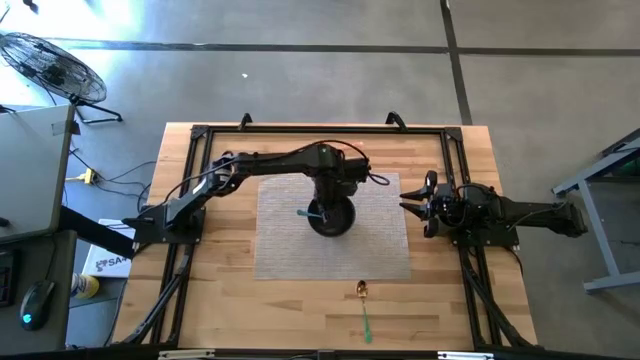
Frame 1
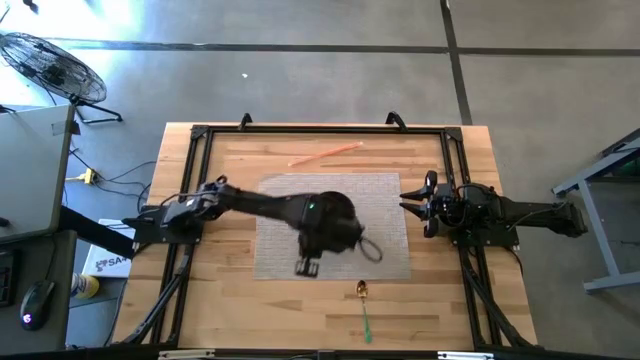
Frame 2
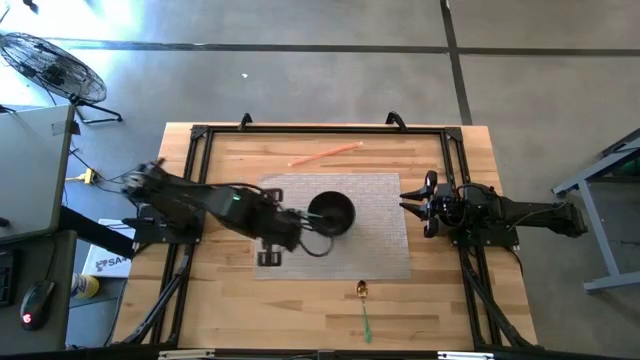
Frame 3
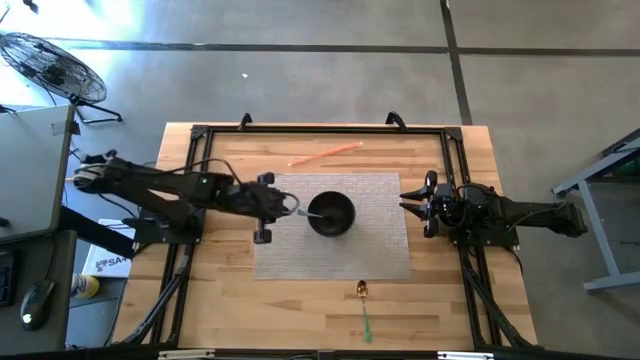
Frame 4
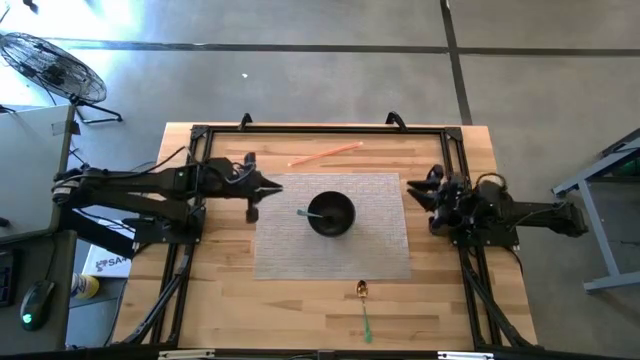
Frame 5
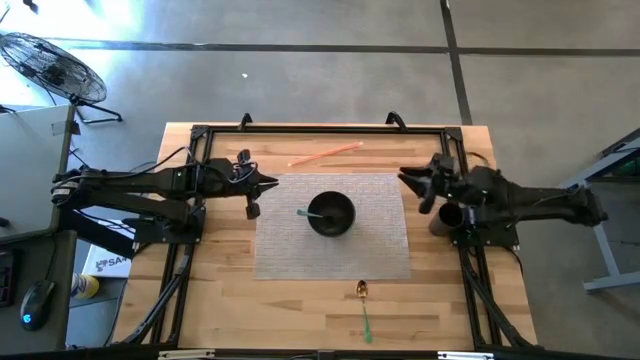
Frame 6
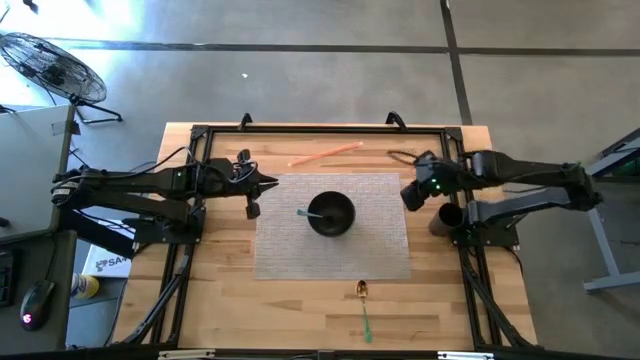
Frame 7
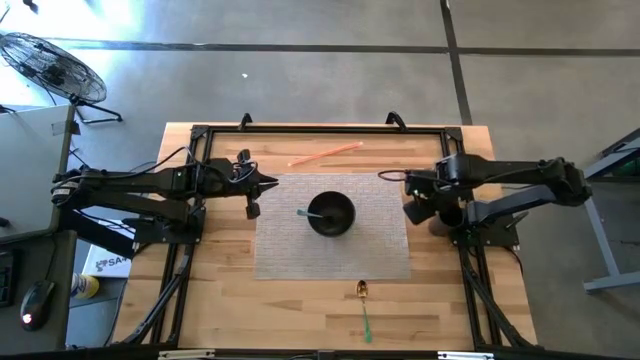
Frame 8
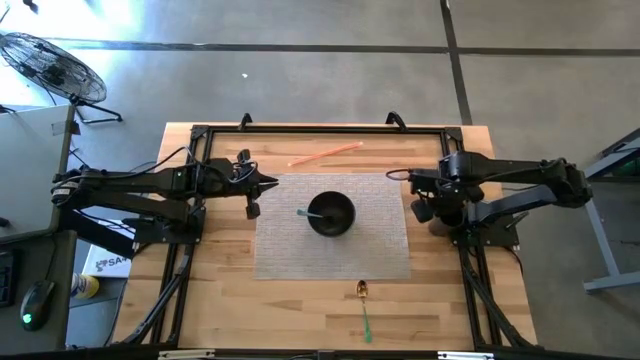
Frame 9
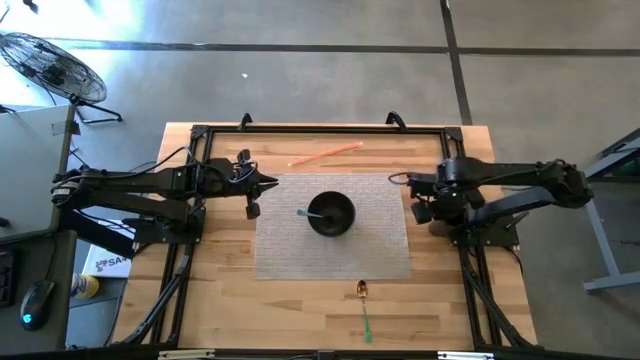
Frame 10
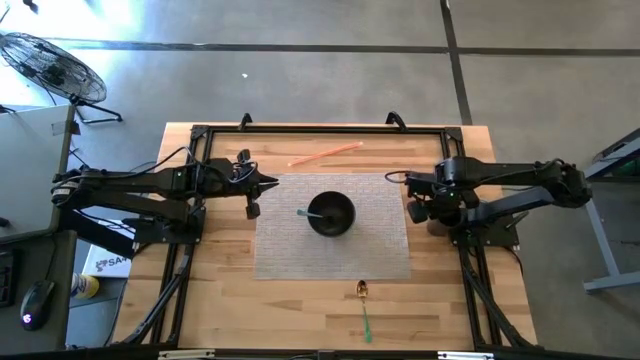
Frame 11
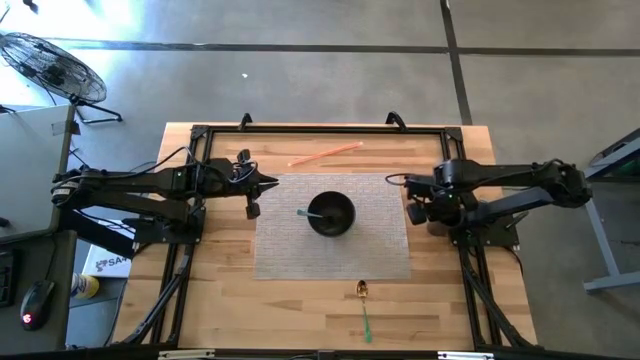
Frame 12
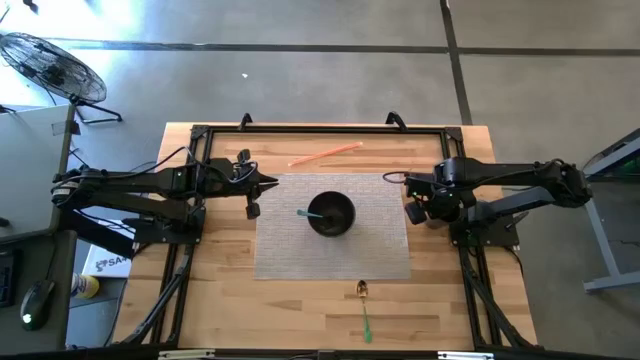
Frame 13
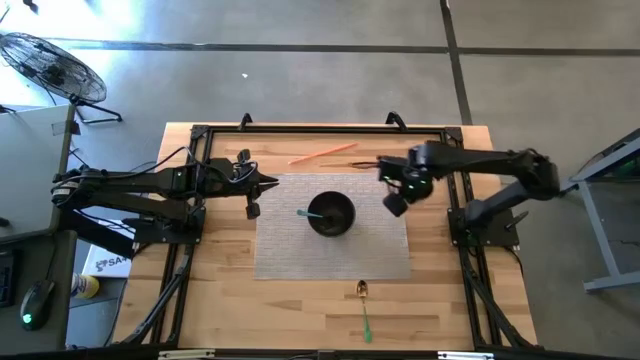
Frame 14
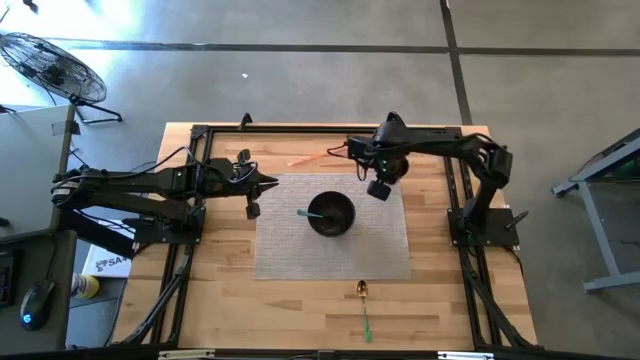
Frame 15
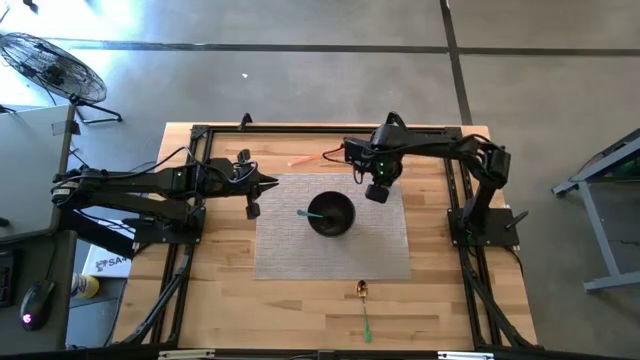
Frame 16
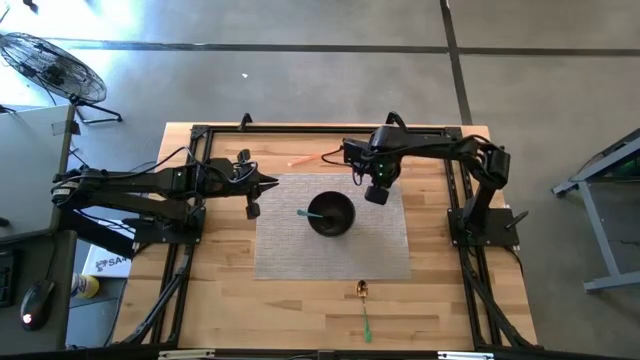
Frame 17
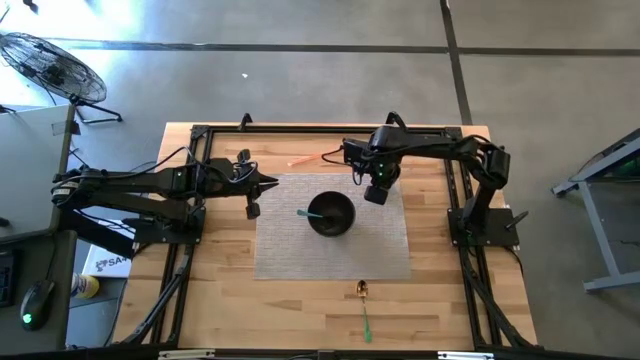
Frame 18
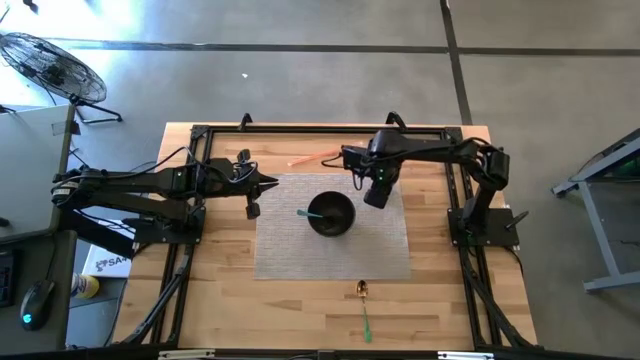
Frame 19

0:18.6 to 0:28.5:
Task: Pick & Place Utensil
Put the black cup on the mat to the right of the black bowl

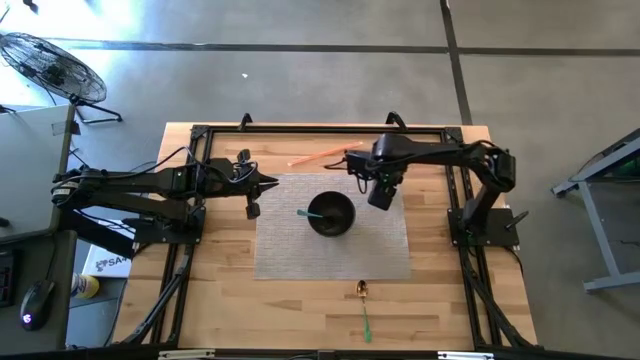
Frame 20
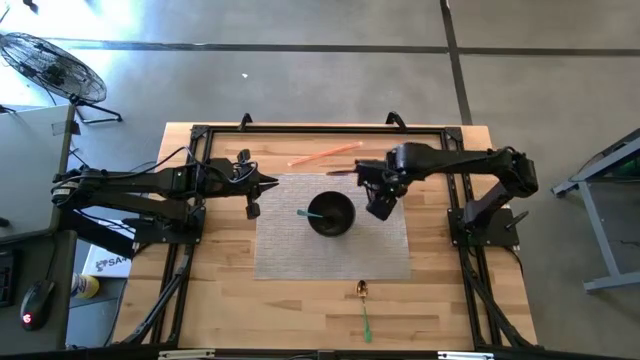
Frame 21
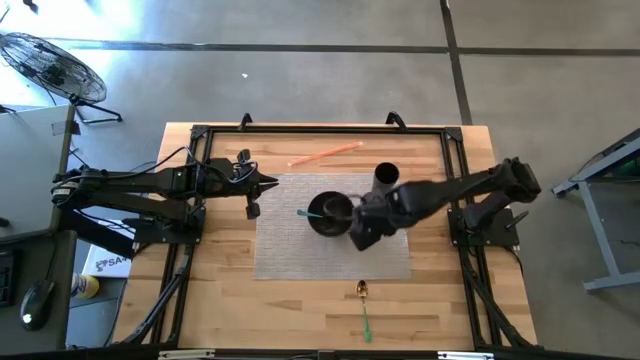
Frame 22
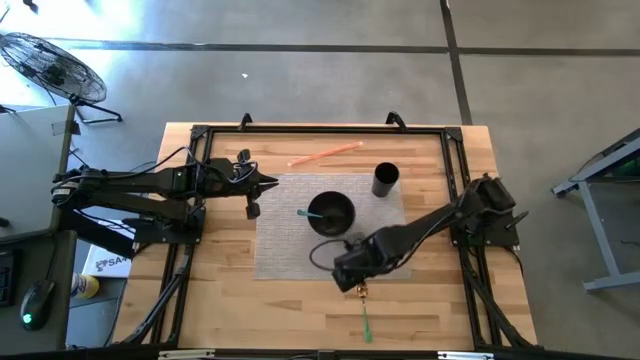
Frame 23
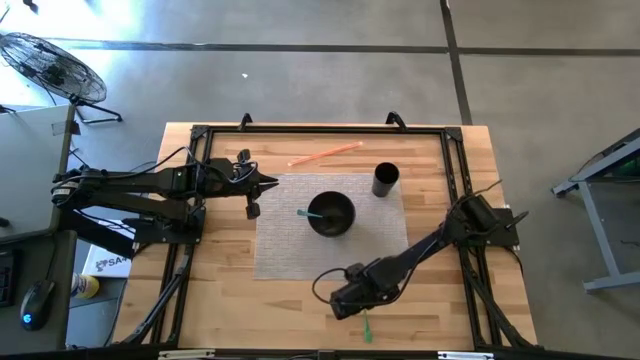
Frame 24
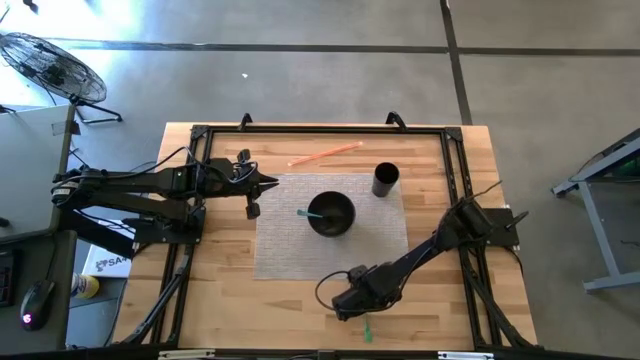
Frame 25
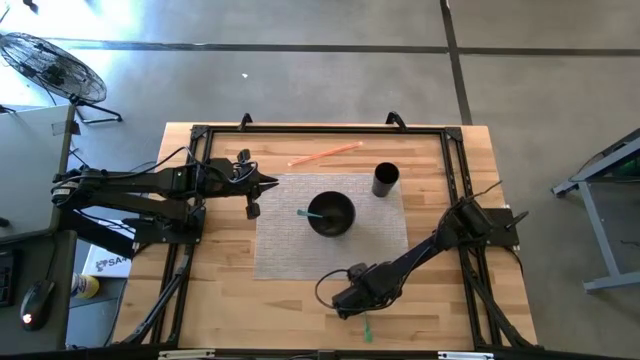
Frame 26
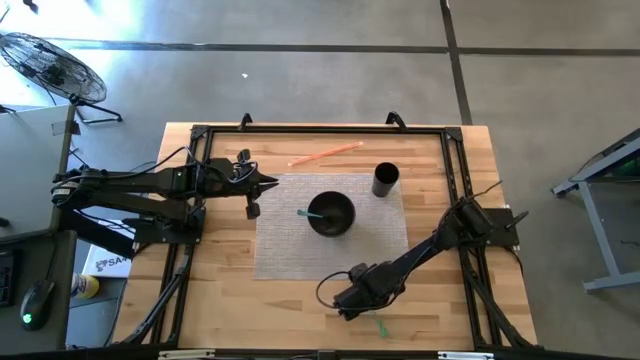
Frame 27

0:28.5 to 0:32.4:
Put the green spoon into the black bowl

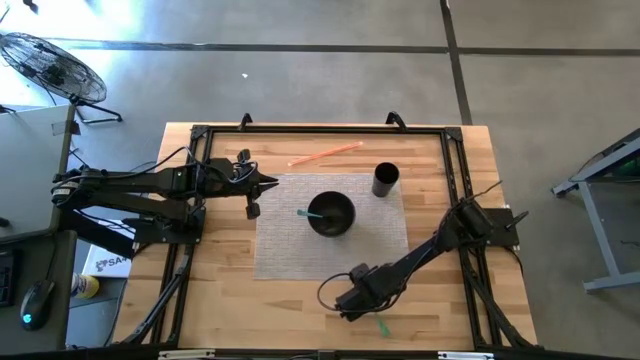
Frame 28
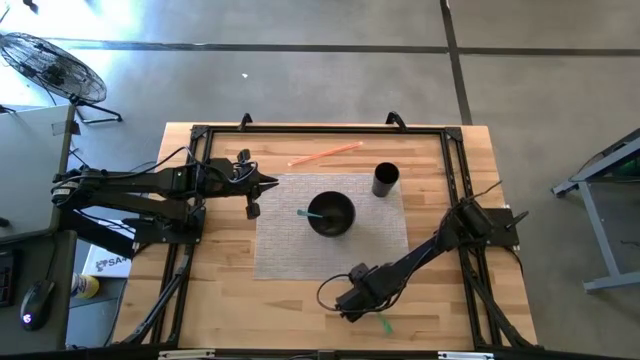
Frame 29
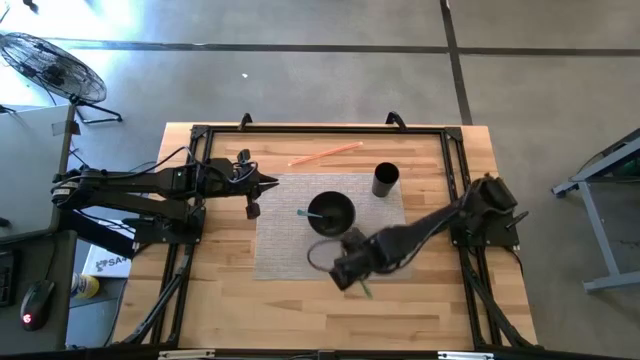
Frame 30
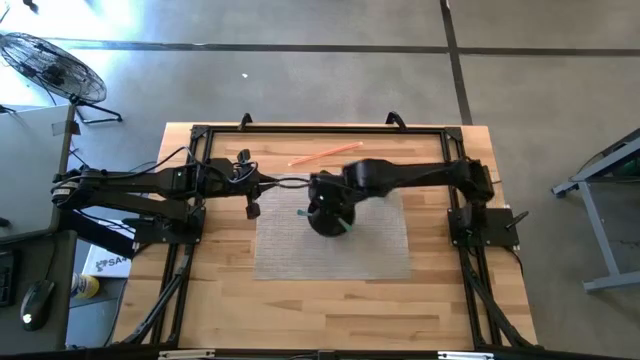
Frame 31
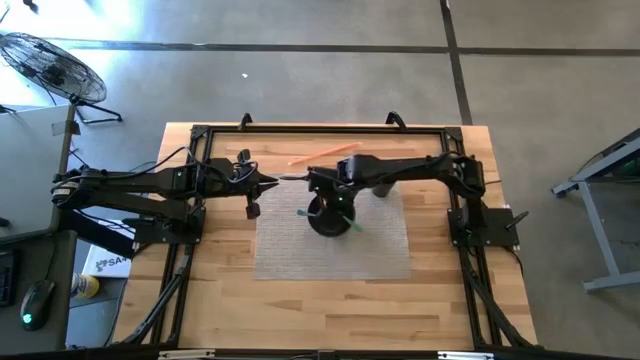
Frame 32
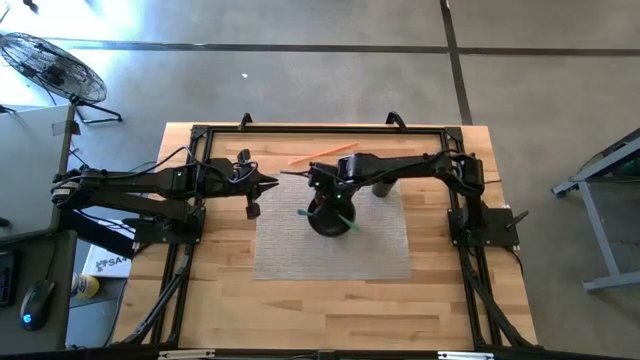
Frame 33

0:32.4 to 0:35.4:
Put the green spoon into the black bowl

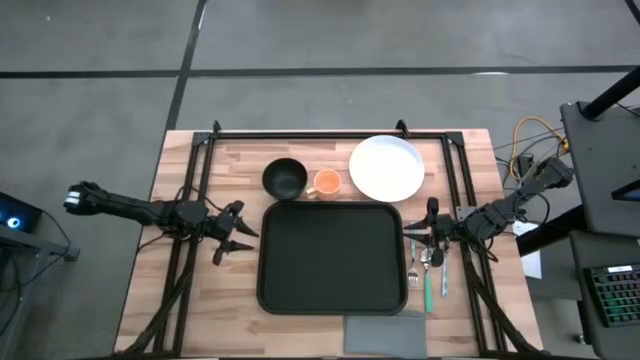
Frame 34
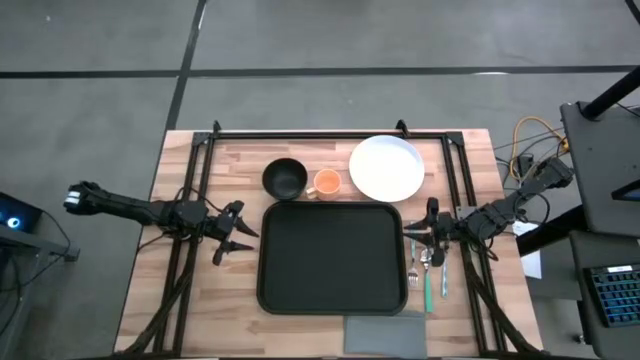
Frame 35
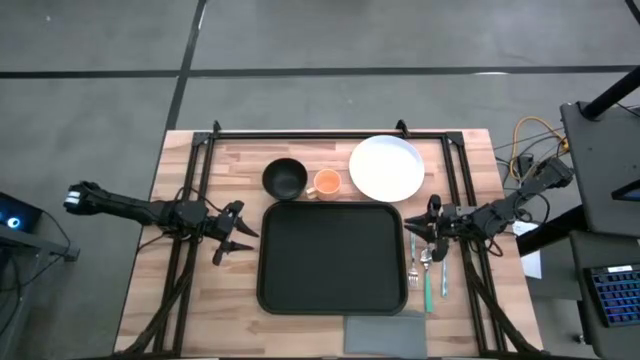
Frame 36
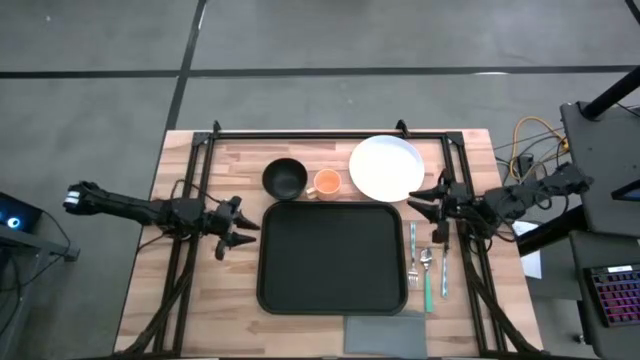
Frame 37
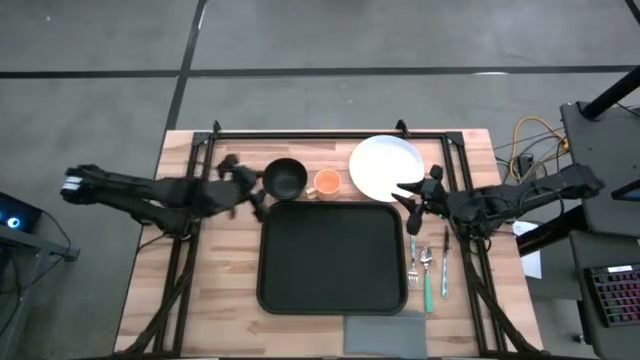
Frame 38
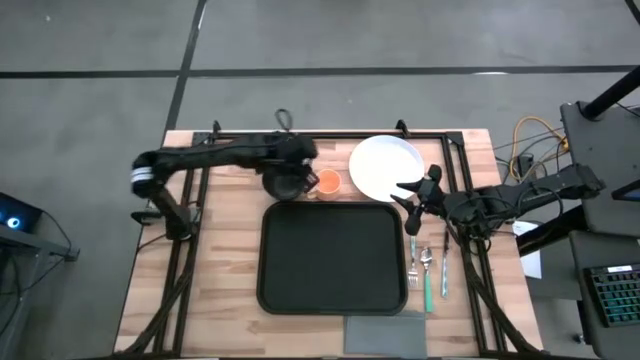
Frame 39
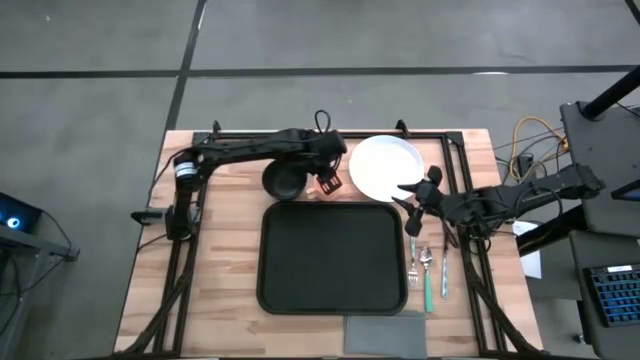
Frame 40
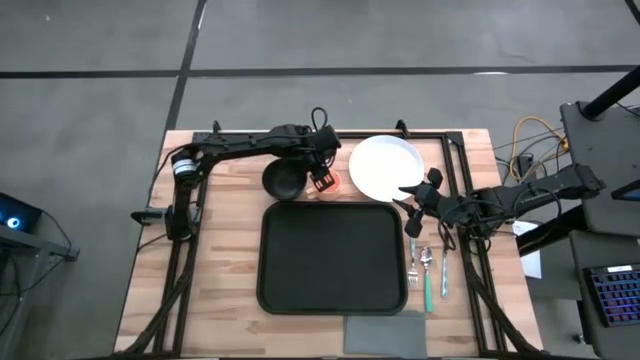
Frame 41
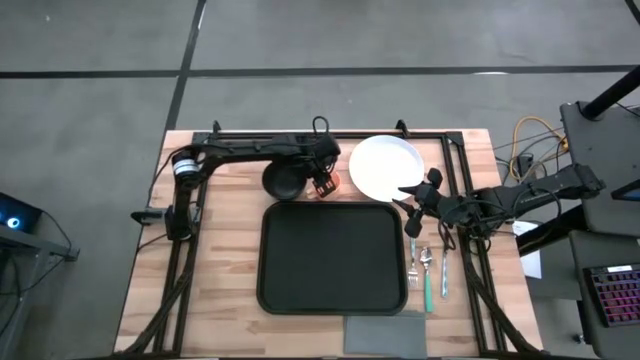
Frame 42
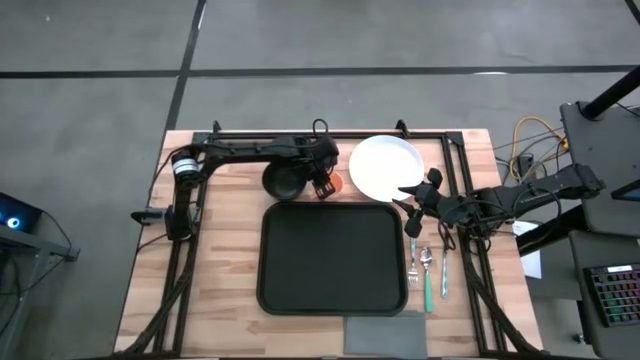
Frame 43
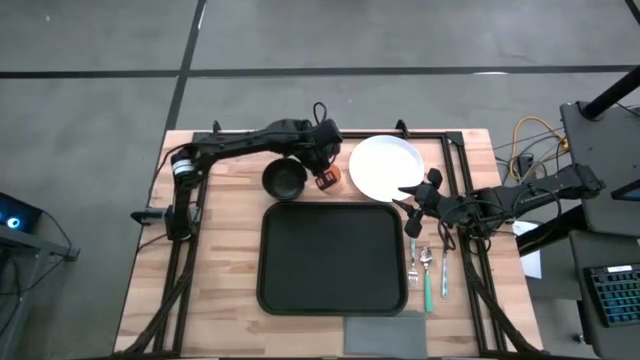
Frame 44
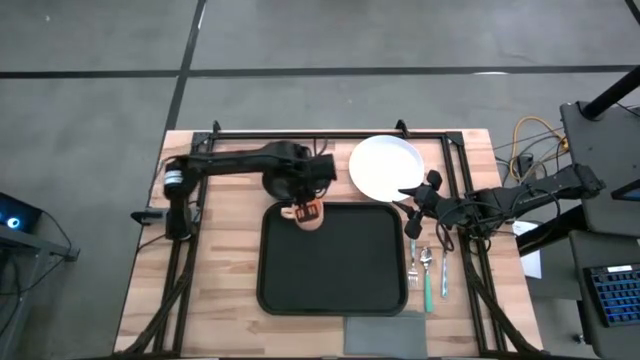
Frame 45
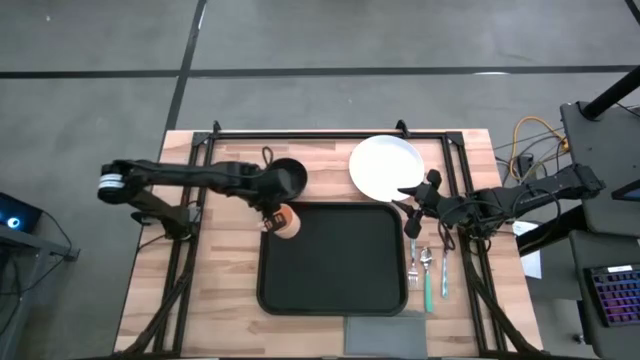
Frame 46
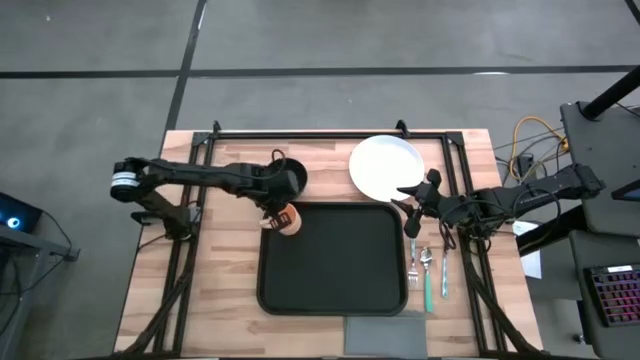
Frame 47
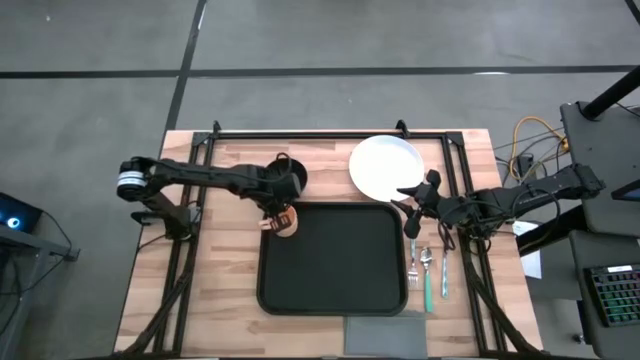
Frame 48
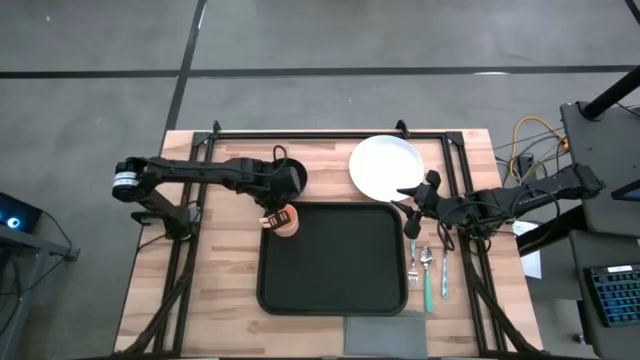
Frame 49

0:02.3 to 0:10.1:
Task: Set up tray
Put the yellow cup on the black tray
